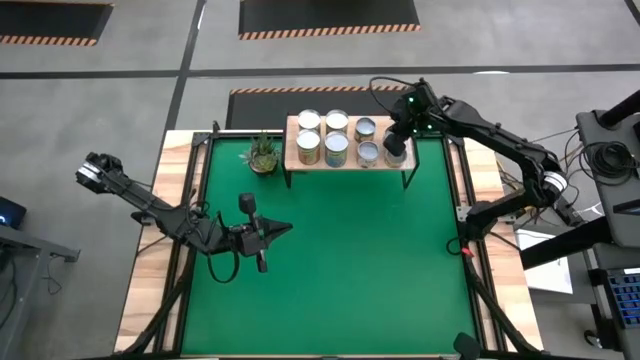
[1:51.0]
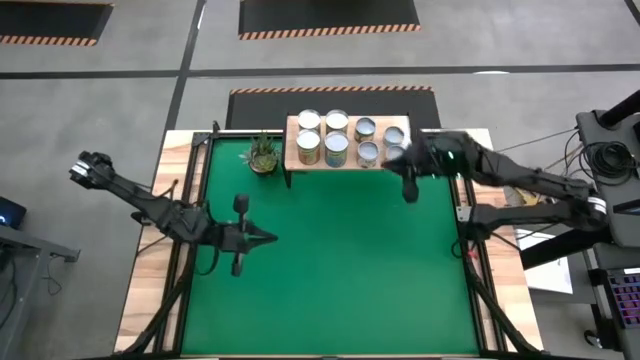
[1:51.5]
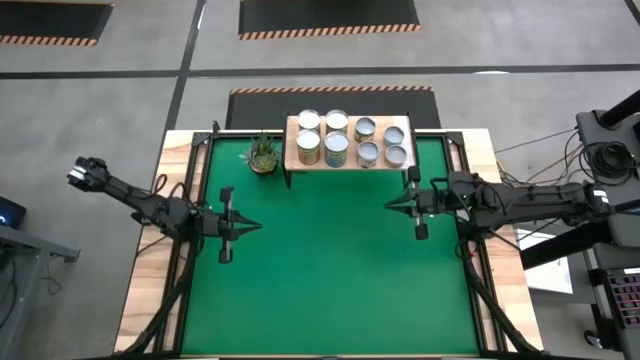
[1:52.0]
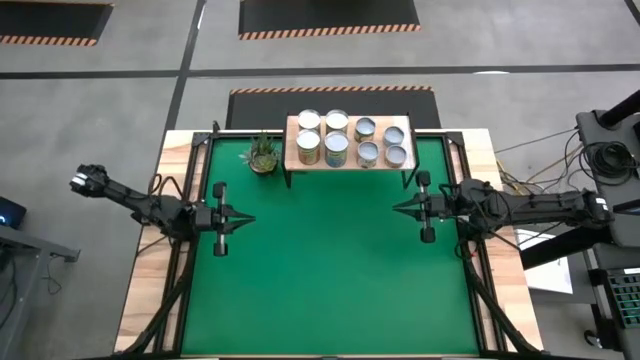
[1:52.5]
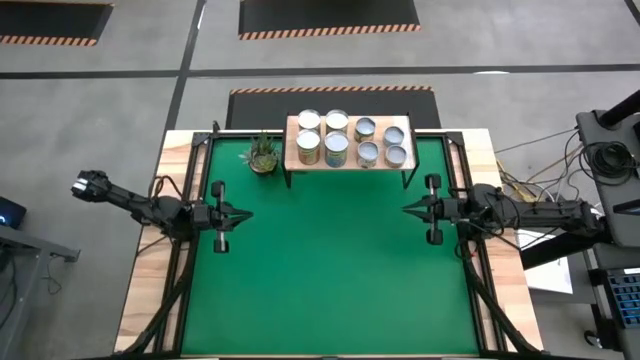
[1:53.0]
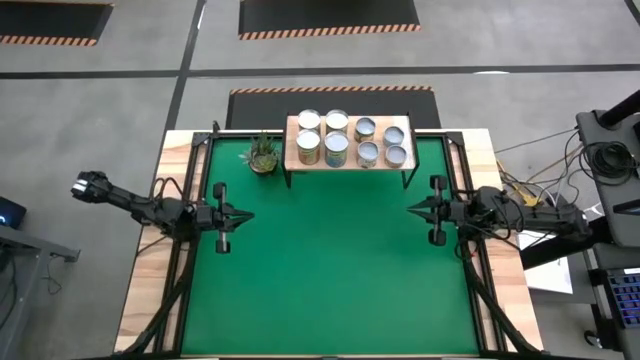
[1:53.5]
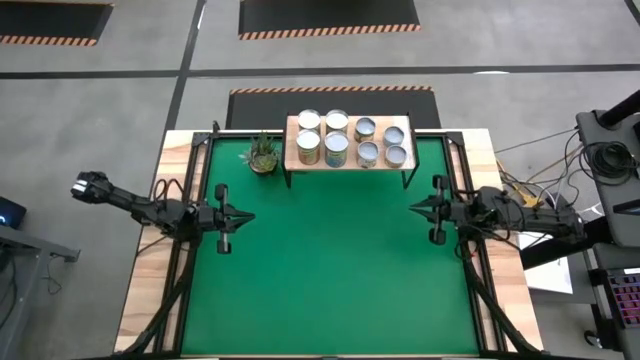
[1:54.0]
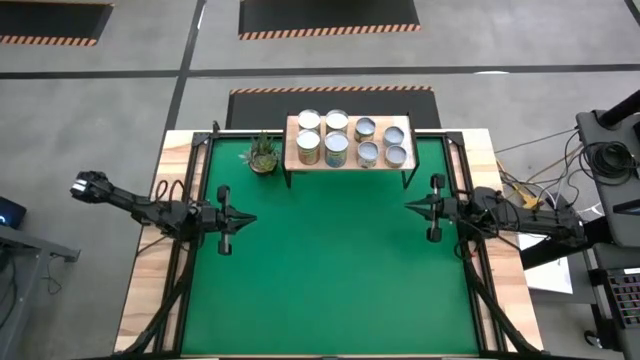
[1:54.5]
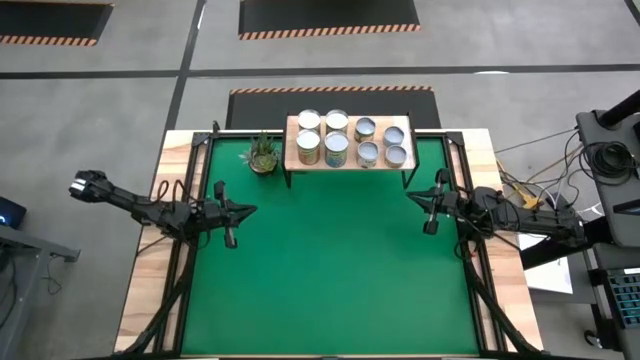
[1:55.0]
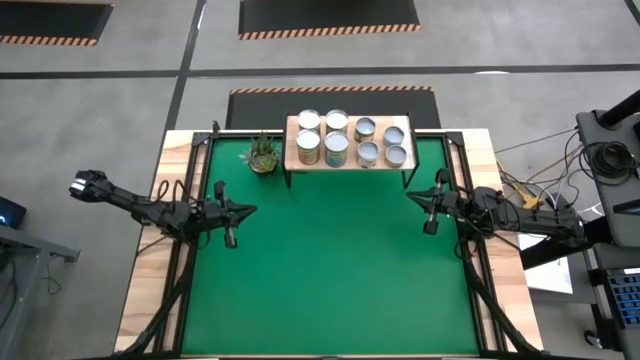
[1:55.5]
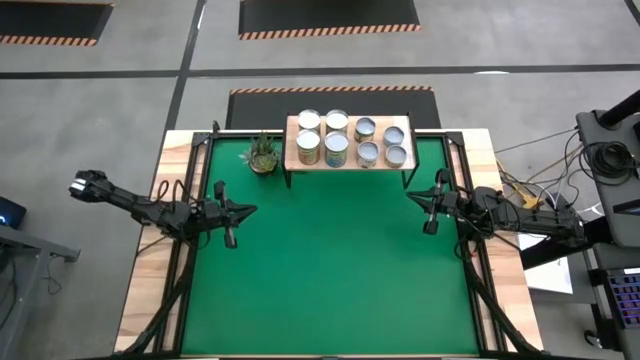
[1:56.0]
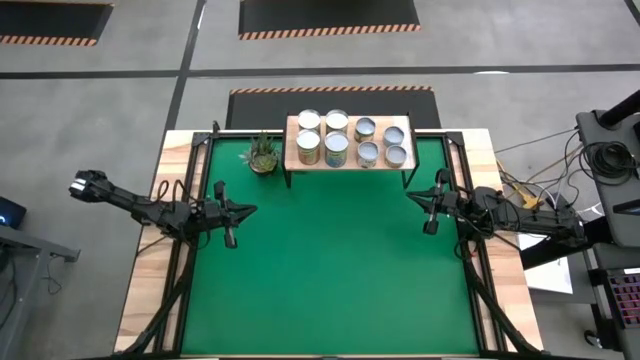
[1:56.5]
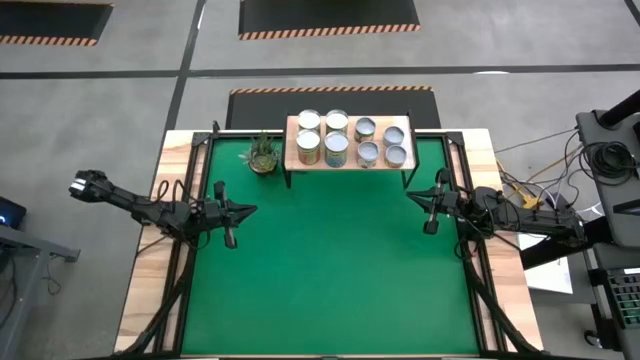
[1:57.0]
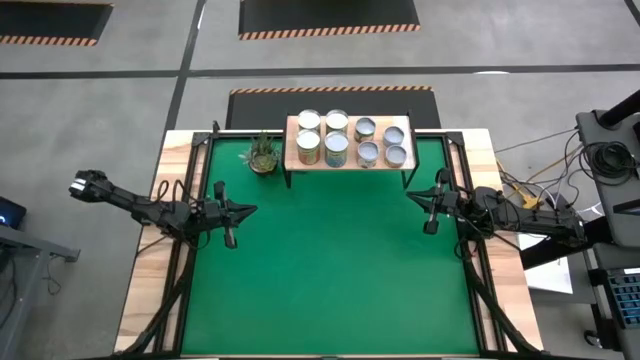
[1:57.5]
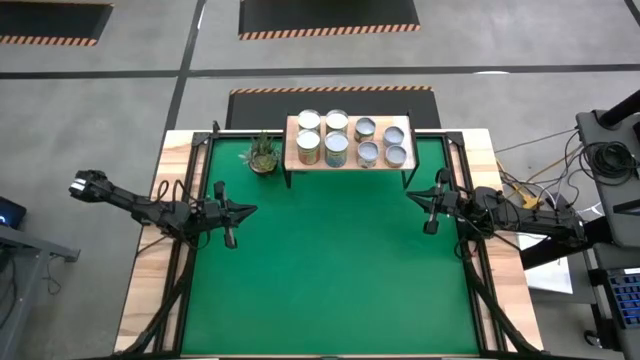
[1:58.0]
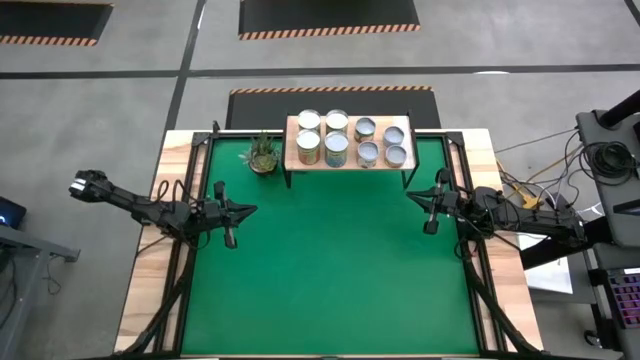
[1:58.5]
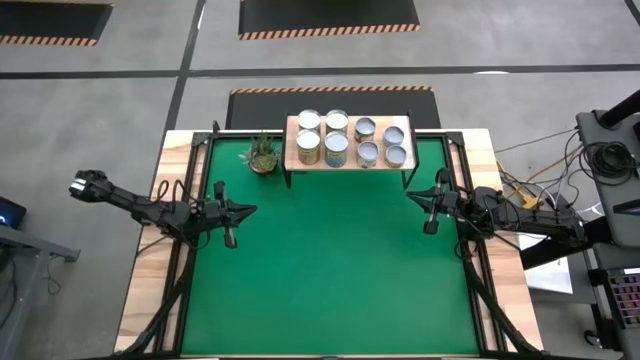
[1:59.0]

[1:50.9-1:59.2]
Task: Pick and place cans onto a shelf
Return to Home Position

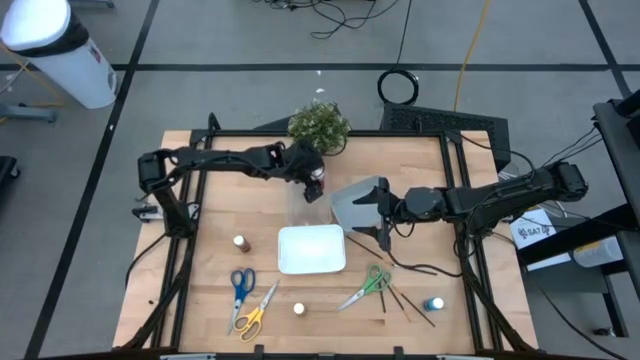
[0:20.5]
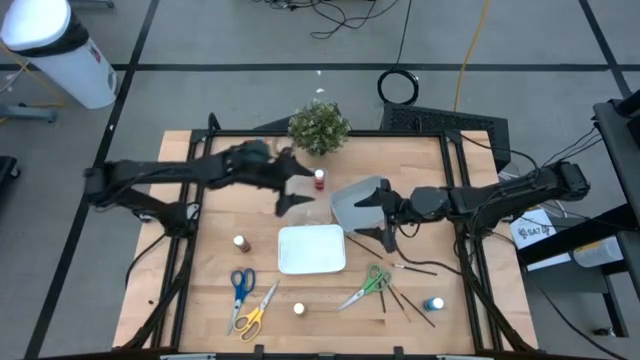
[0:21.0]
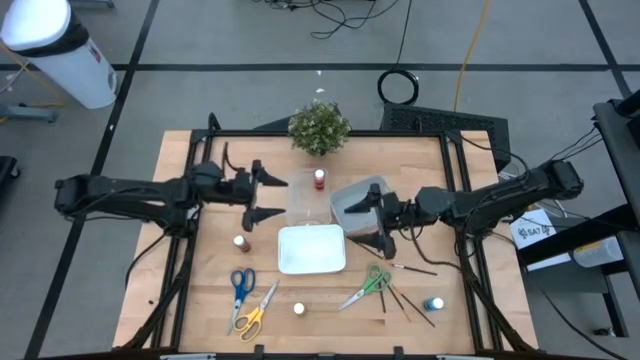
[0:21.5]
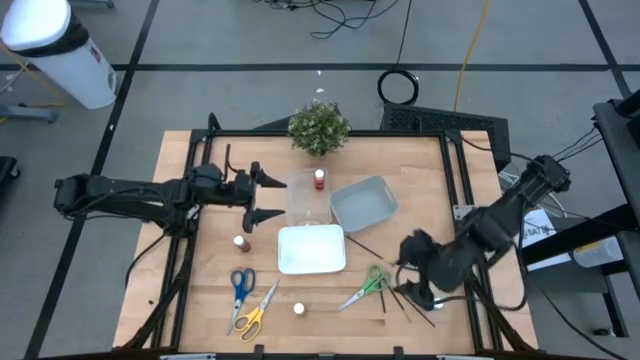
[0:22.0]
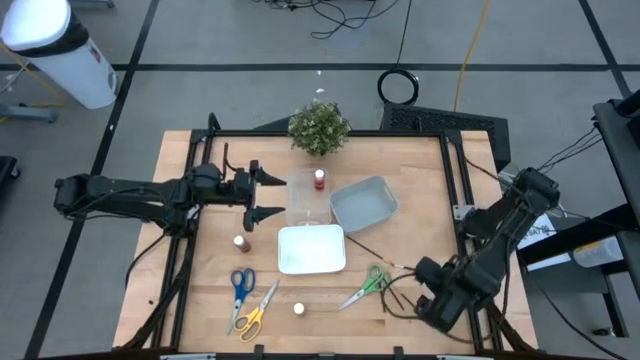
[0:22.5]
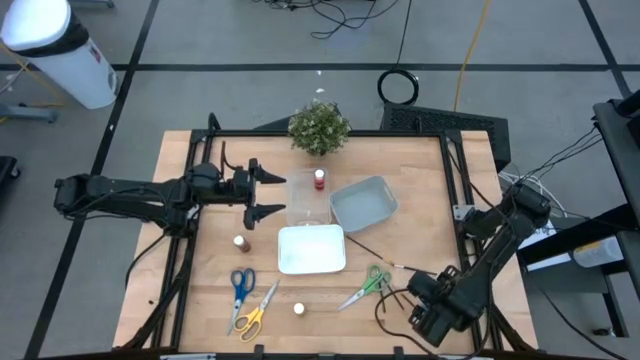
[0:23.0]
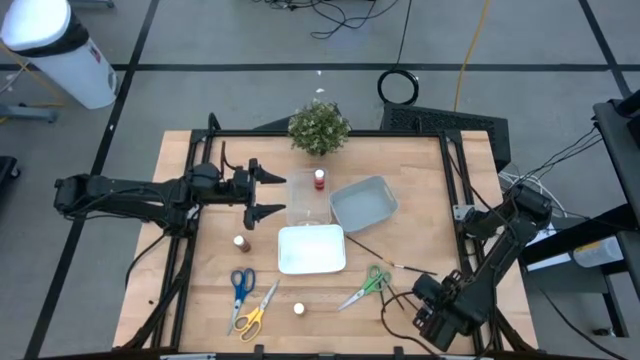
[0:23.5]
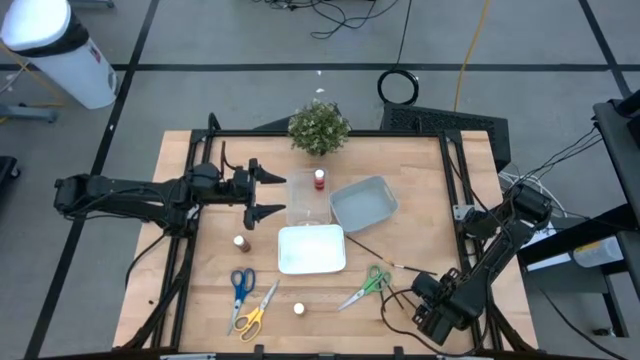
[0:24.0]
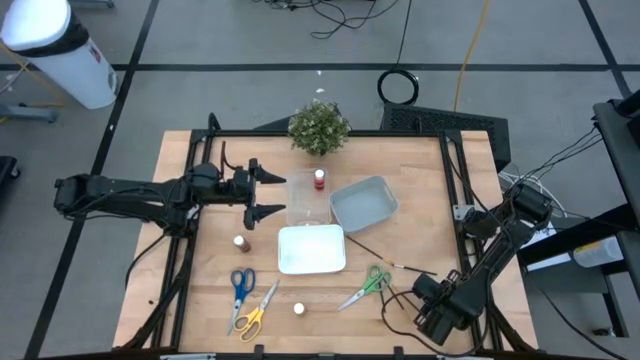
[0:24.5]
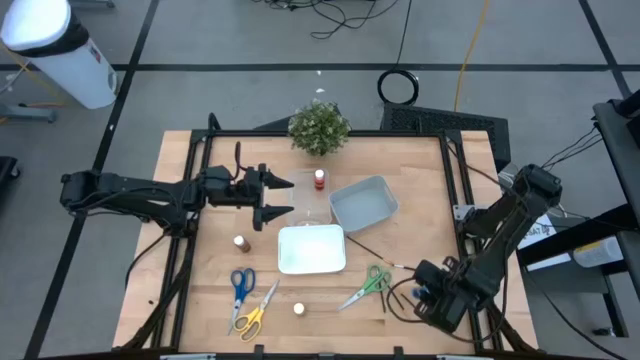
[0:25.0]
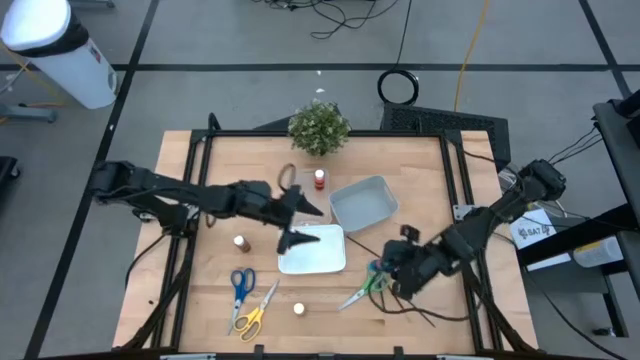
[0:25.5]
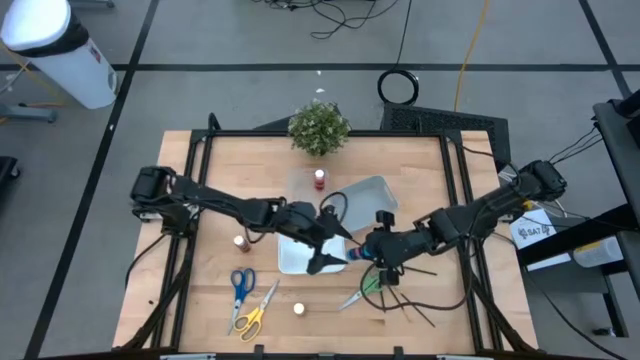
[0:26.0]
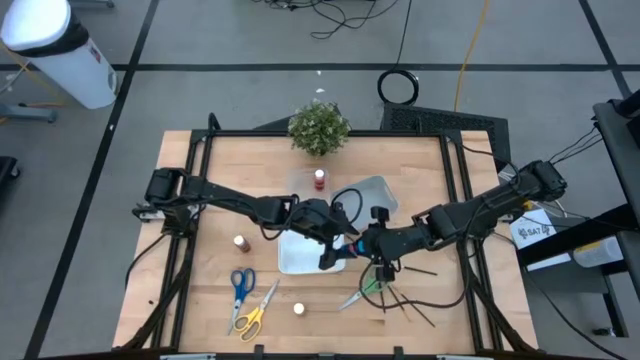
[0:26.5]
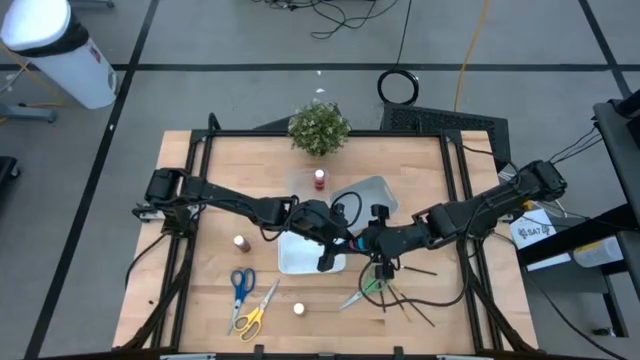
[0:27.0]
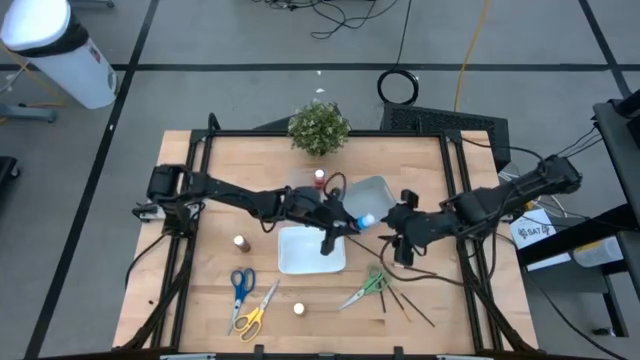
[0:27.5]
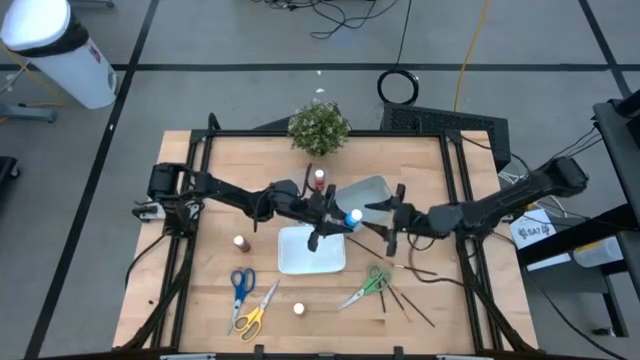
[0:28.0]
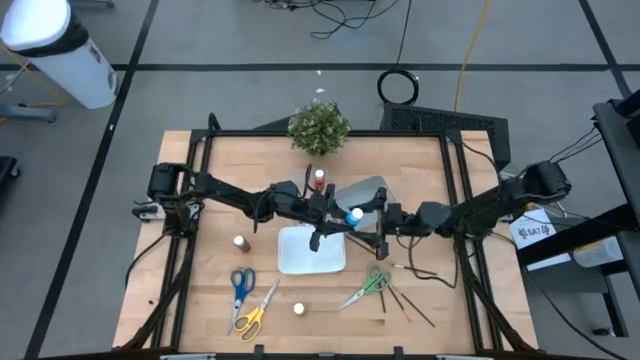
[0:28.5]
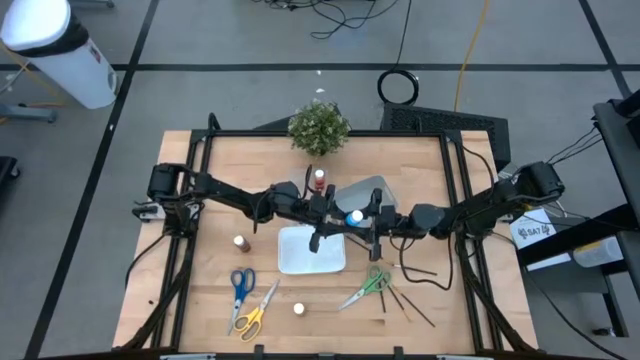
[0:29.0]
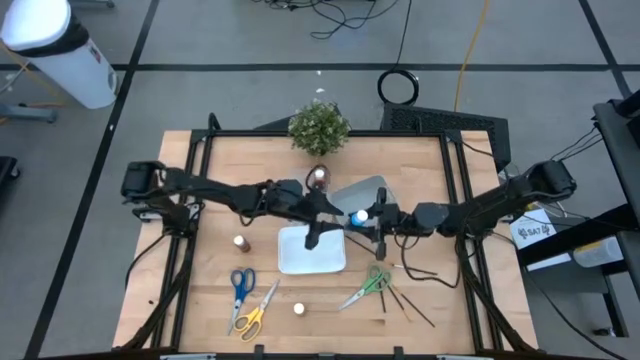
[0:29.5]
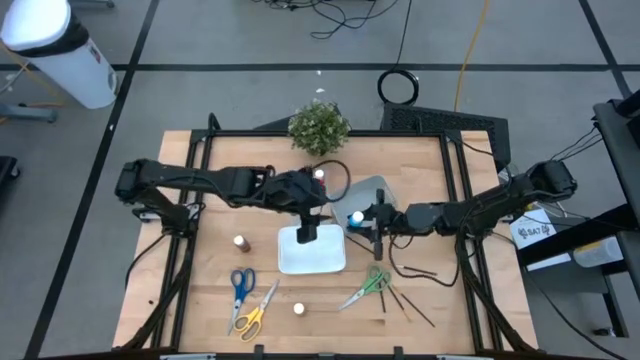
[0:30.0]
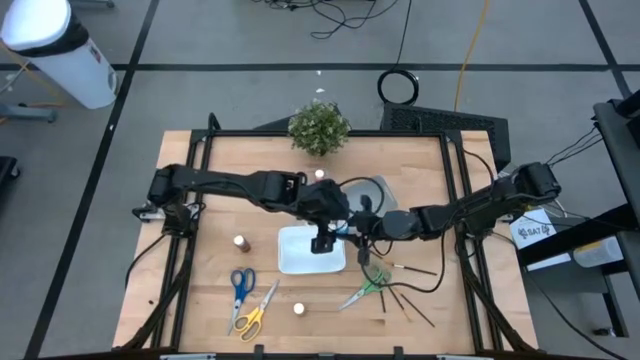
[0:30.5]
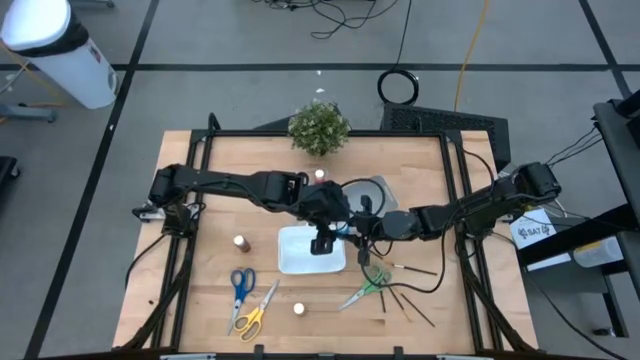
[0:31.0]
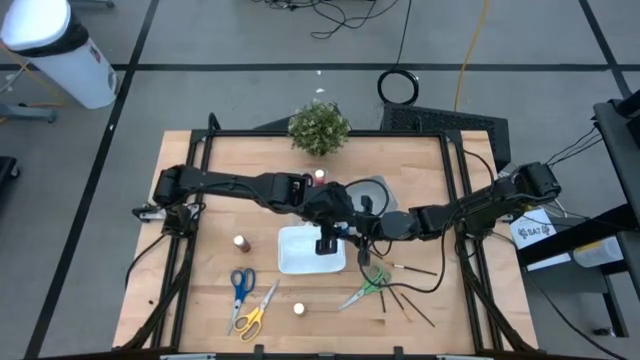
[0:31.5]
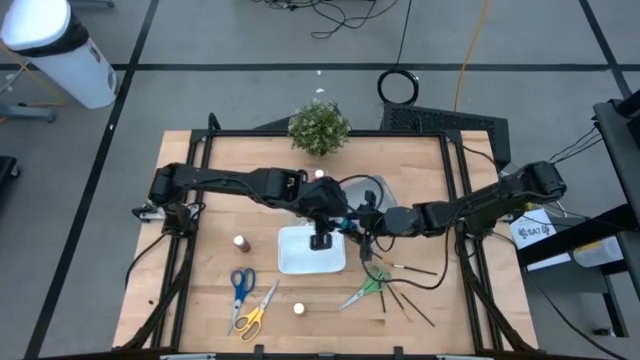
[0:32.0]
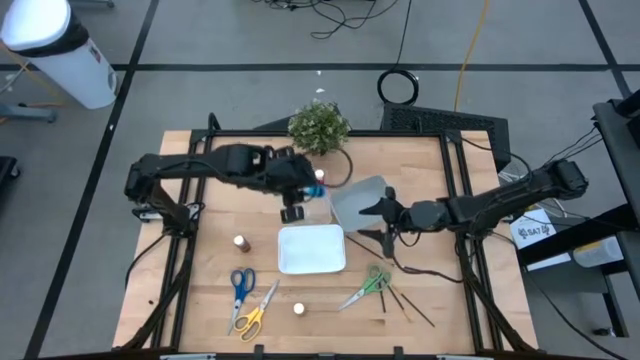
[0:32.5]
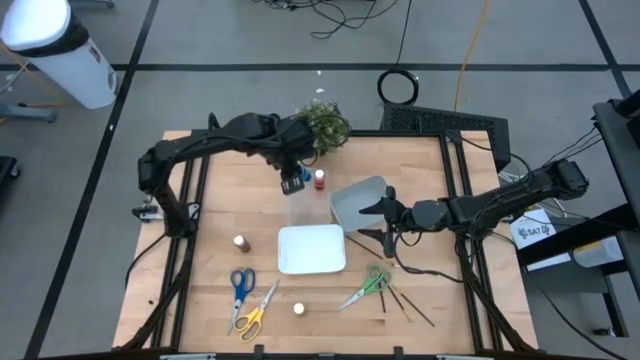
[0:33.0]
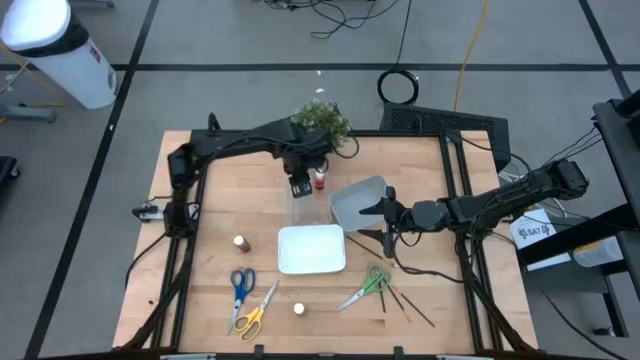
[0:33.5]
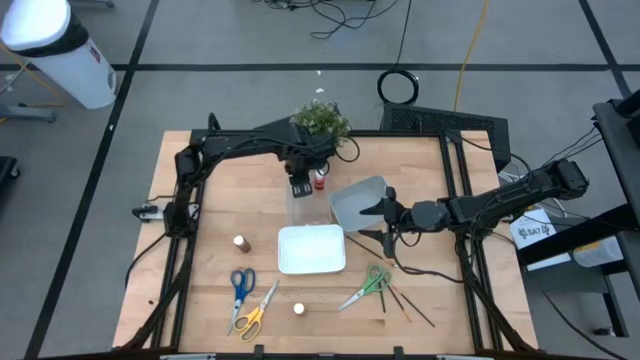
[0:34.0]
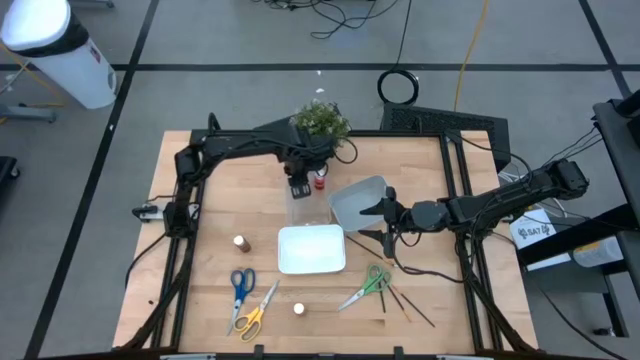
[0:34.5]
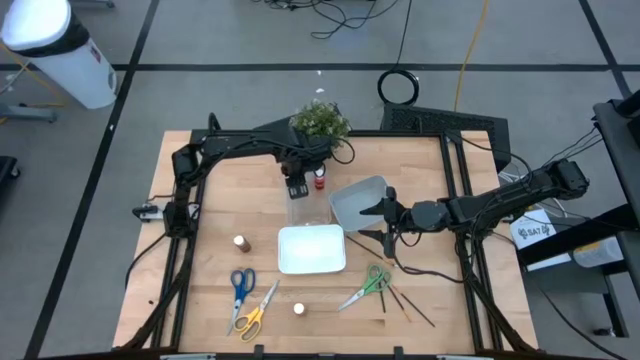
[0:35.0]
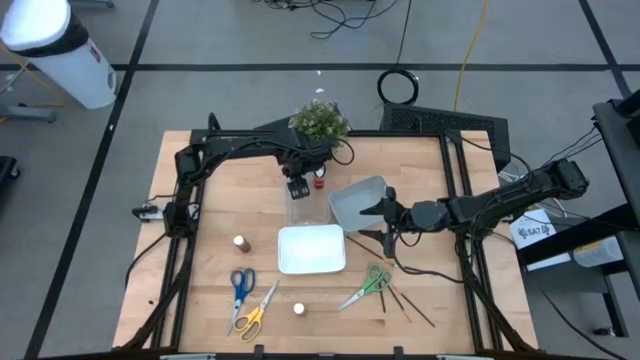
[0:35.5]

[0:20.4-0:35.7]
Task: Pick & Place Paint Supplies
Put the blue paint bottle into the transparent bin
